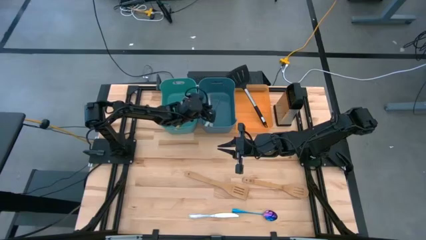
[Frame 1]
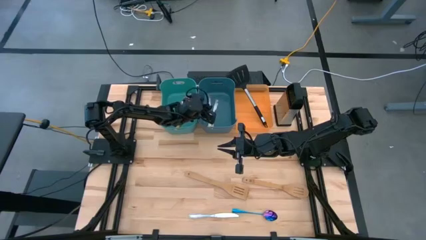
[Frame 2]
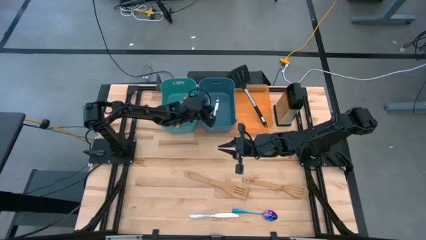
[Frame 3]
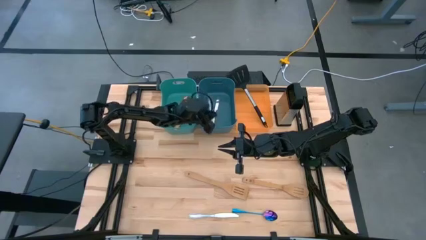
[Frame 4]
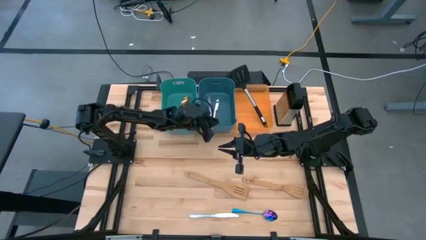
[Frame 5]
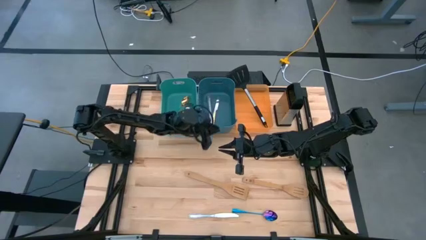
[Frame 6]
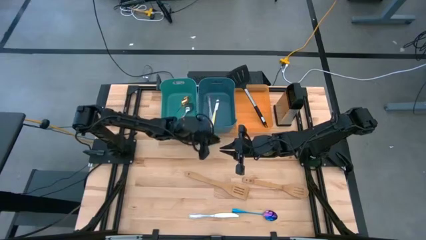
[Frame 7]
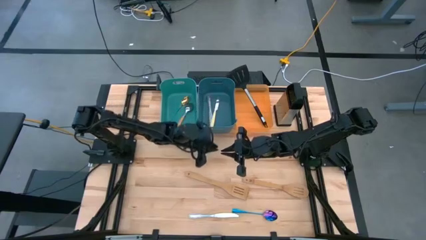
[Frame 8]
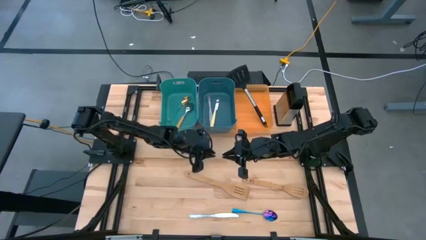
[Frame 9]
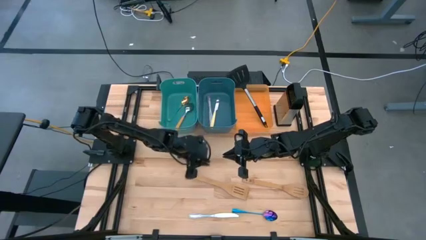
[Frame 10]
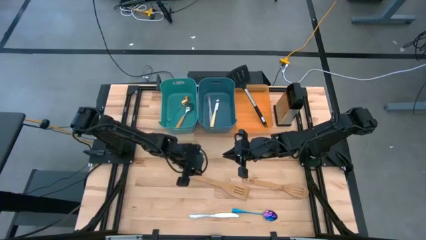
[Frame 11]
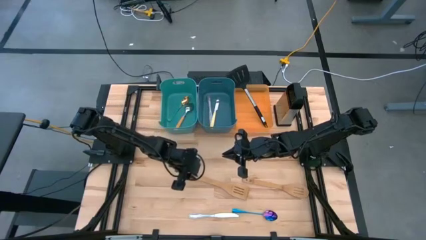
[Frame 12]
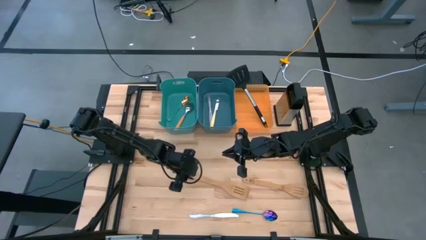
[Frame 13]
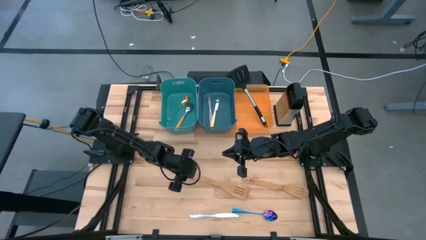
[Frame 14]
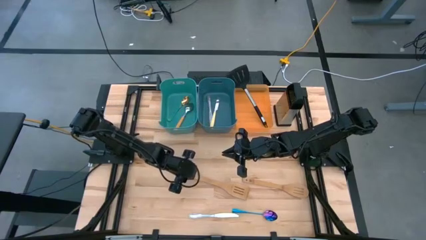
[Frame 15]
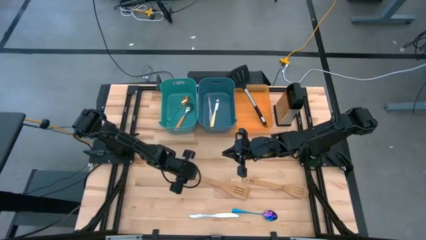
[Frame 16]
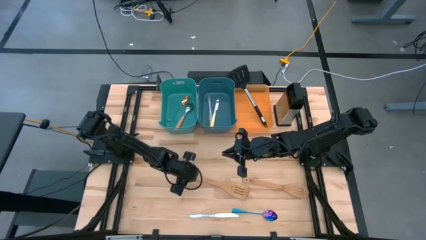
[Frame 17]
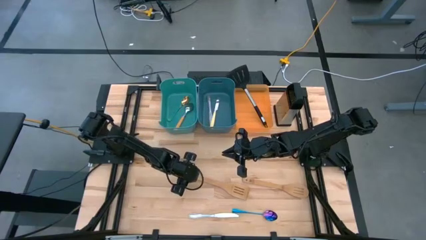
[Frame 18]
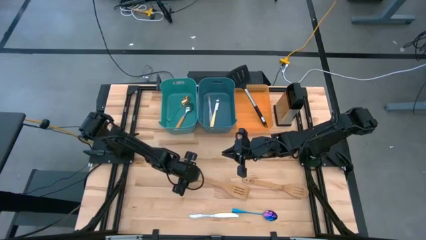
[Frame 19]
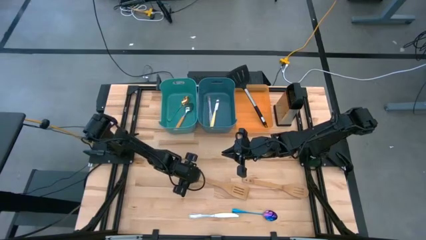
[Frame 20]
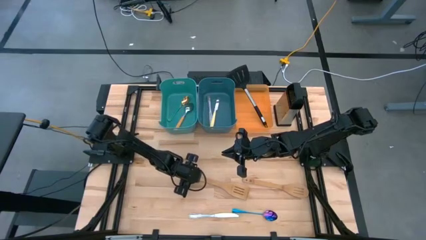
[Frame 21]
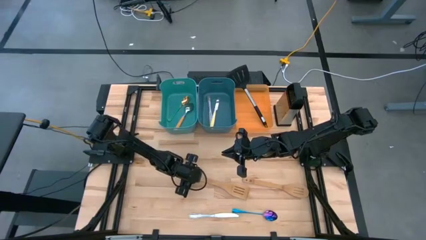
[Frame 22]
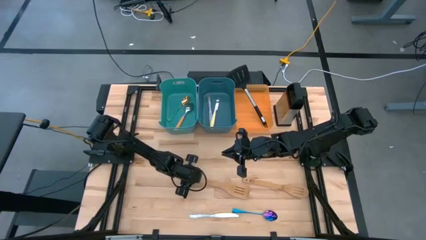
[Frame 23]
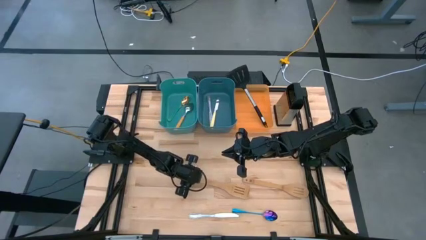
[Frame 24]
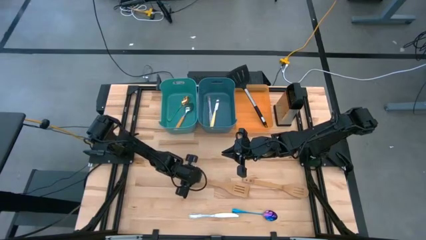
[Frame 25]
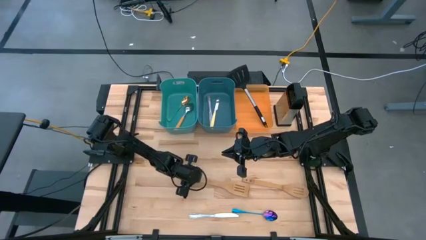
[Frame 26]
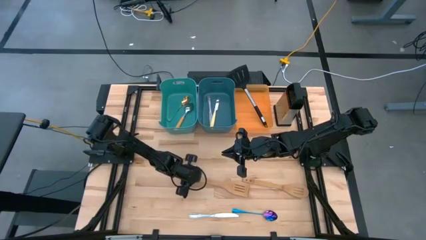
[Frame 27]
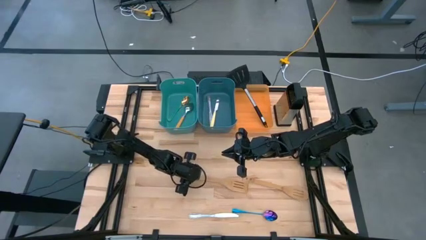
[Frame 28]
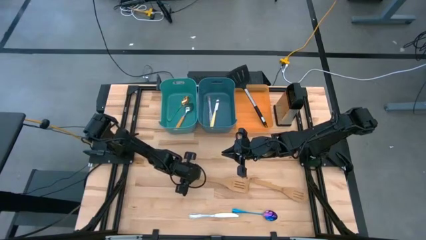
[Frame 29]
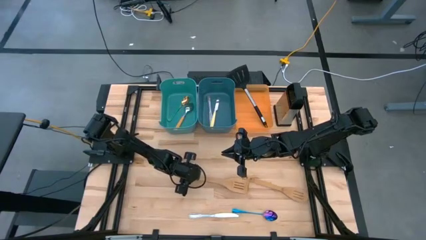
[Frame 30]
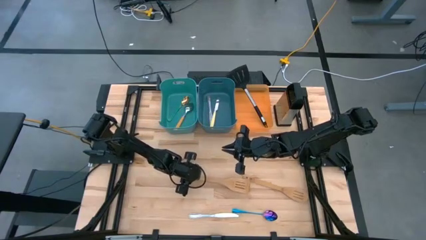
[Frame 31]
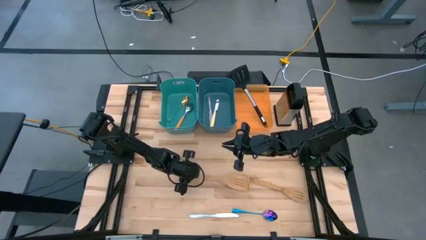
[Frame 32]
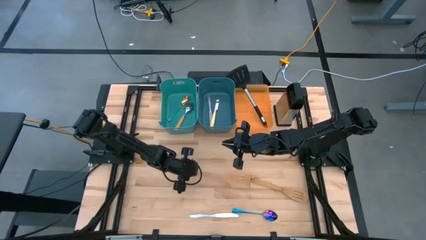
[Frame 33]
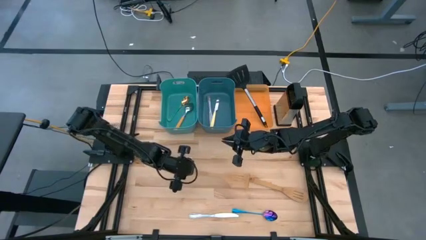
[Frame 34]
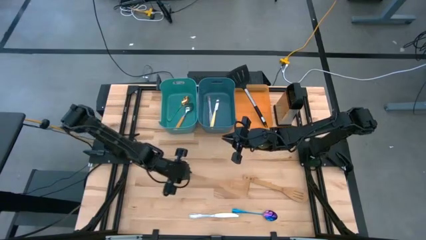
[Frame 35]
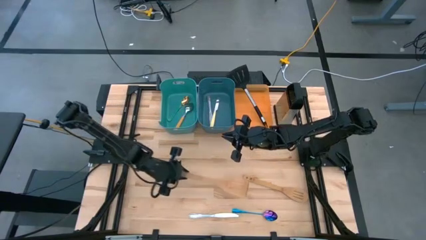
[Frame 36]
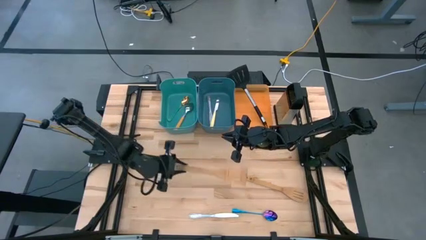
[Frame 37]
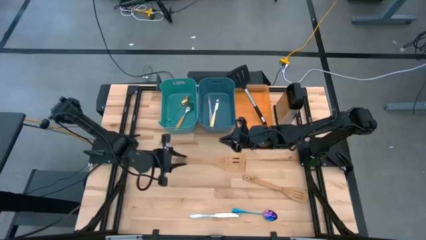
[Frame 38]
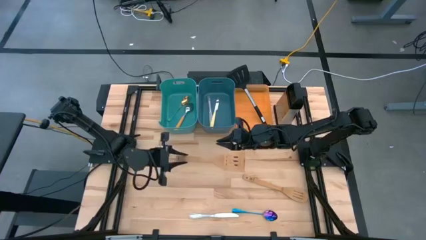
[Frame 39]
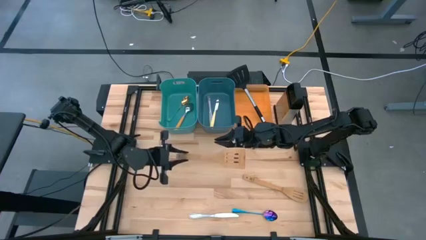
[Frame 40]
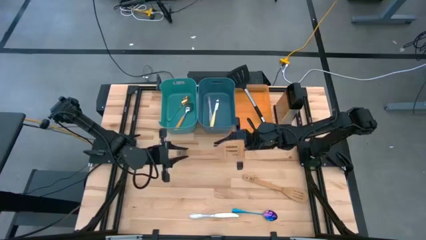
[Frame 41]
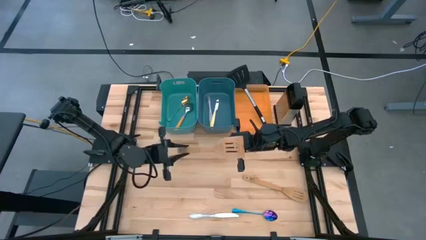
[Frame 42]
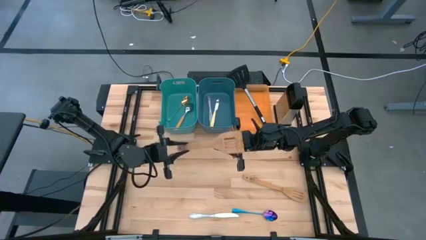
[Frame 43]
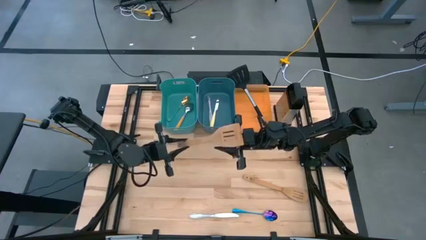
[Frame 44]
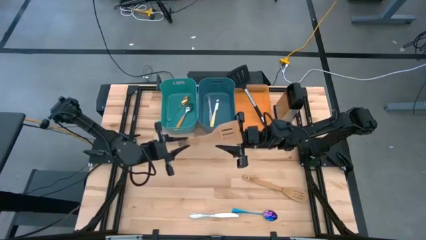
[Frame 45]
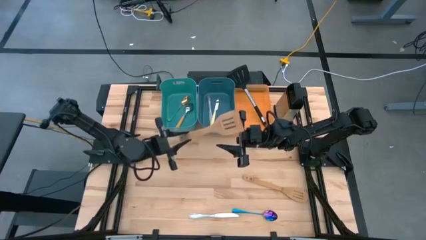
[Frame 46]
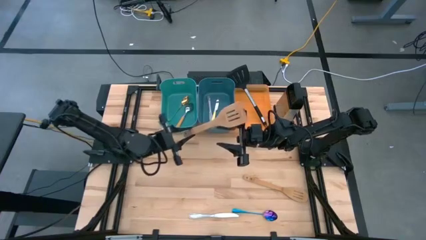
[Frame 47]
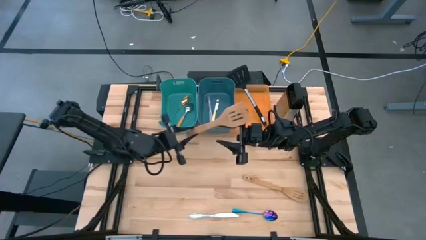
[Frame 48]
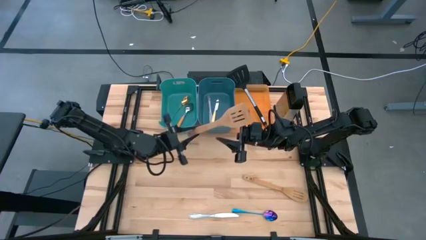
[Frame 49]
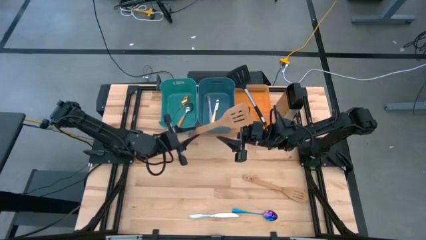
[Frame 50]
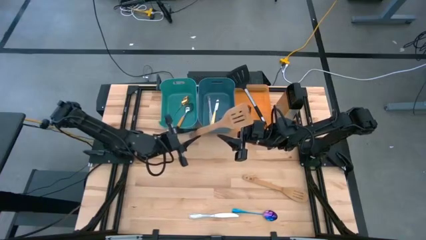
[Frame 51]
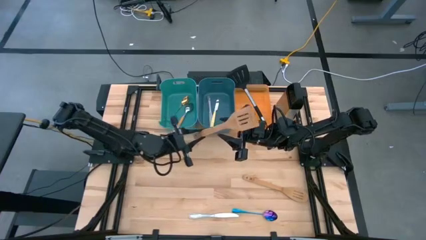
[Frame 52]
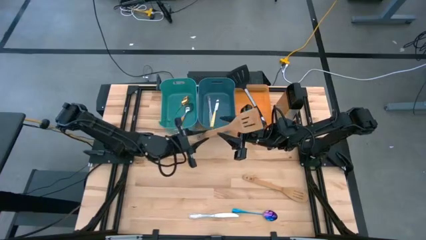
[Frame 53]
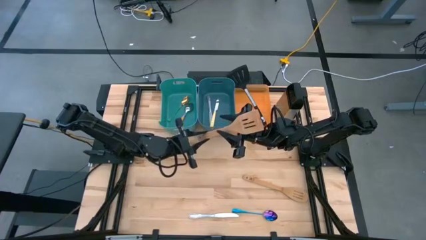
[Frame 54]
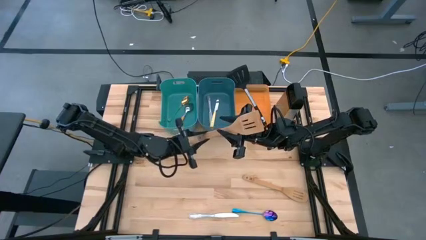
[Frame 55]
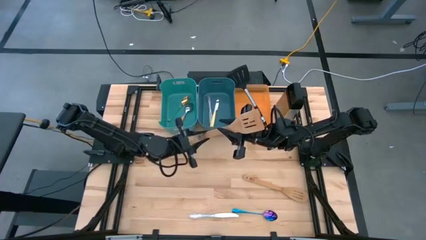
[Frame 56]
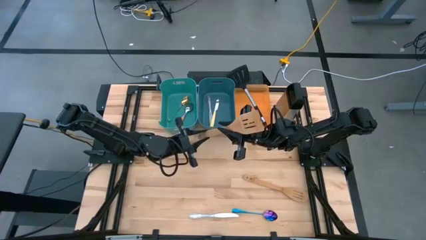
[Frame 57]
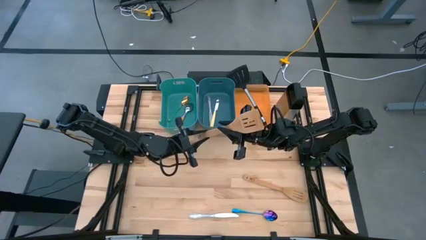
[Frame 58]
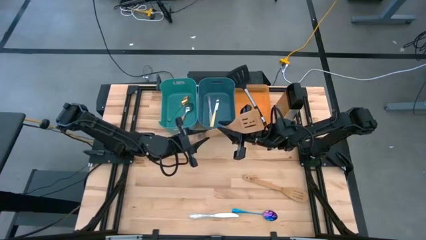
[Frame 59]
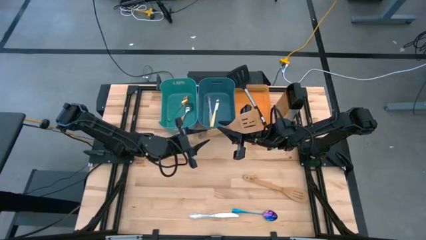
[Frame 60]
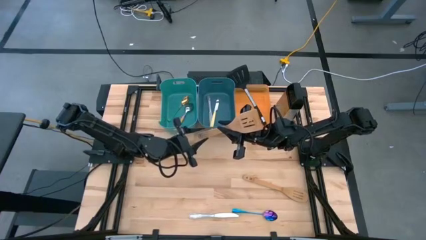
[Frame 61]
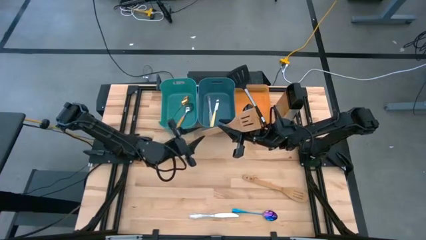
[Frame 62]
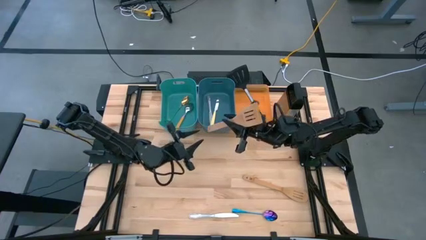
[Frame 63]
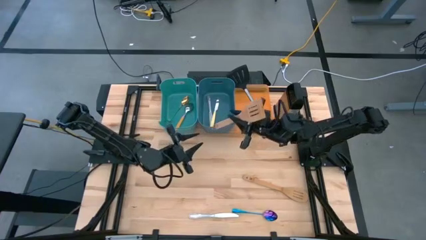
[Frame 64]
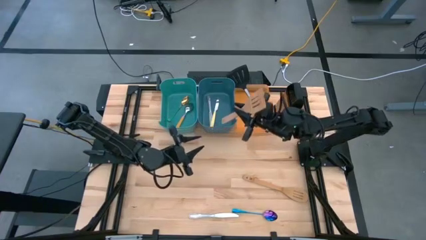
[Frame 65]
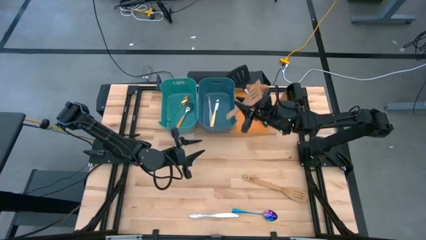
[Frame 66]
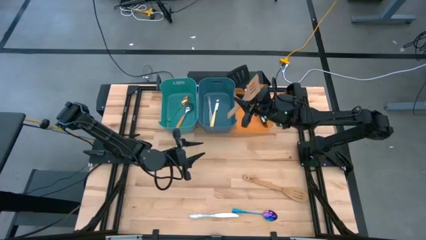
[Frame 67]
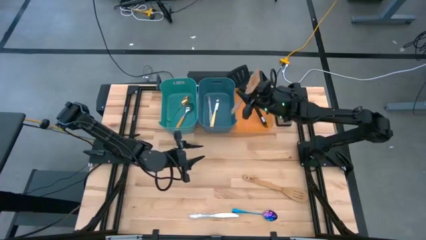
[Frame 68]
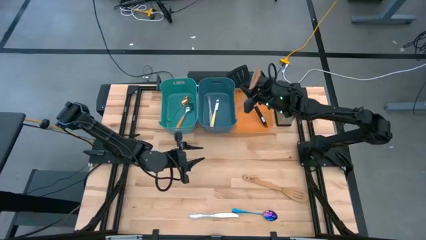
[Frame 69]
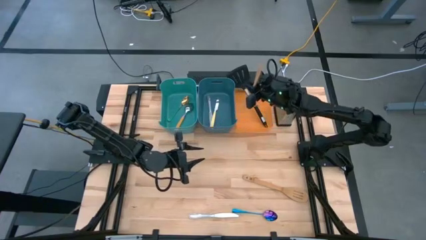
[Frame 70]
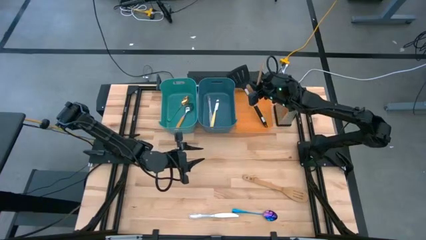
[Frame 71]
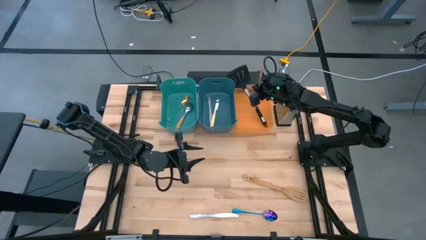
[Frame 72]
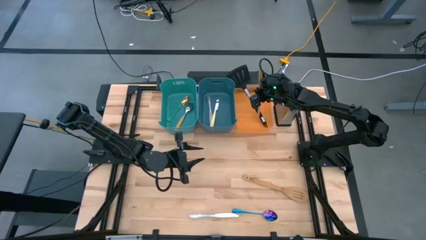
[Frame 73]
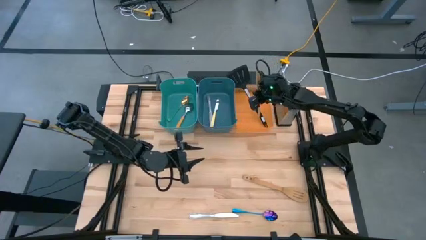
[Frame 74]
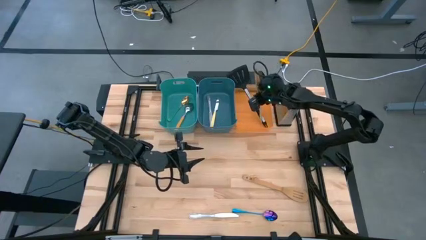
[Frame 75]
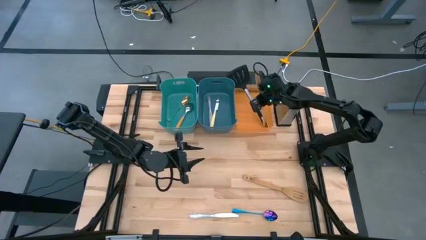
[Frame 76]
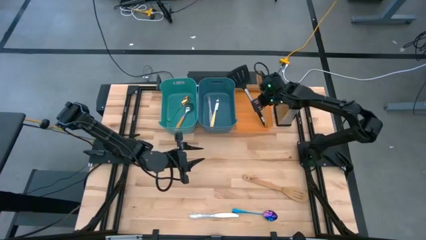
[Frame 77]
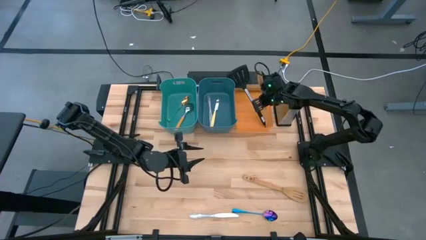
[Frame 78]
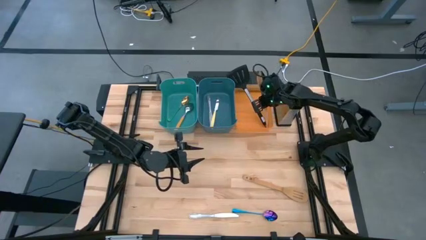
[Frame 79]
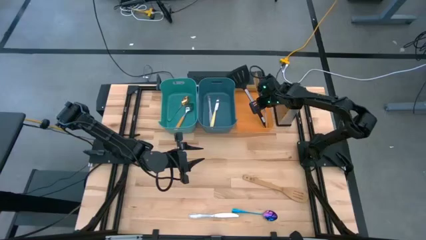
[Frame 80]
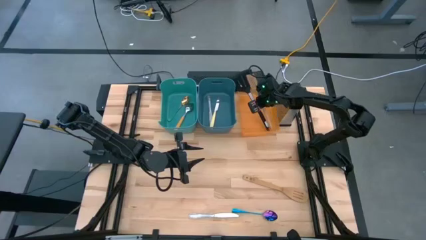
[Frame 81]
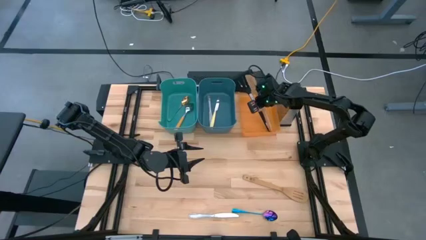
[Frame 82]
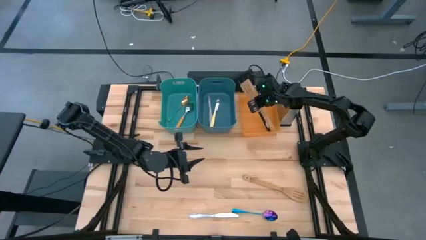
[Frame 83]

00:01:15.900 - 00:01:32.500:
Task: Pick & Place Kitchen Items
Put the bottom brown spatula into the orange bin
